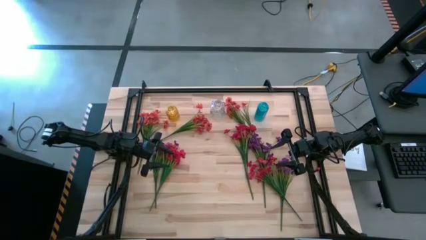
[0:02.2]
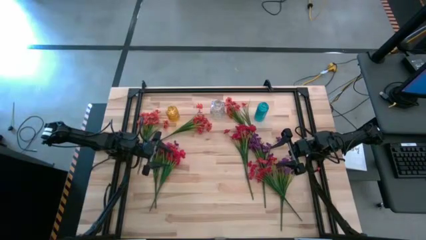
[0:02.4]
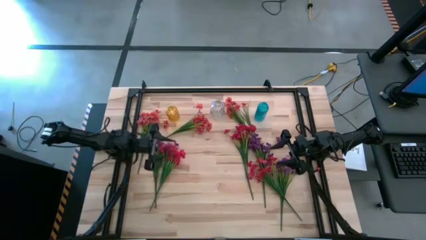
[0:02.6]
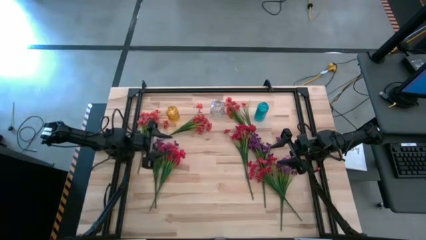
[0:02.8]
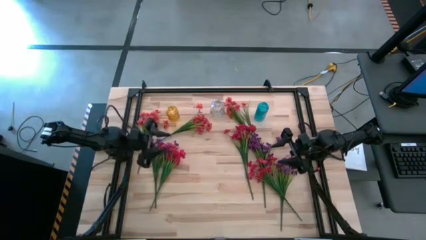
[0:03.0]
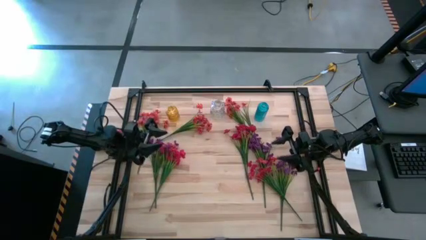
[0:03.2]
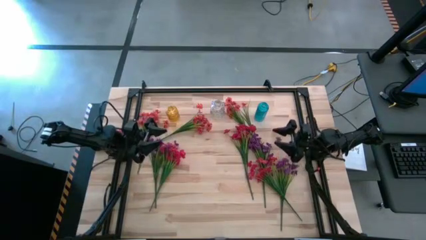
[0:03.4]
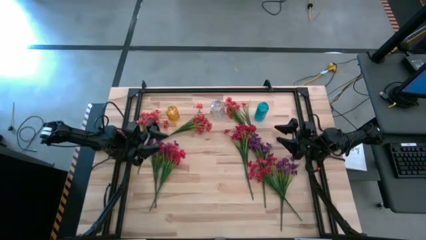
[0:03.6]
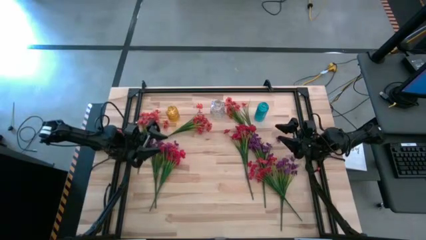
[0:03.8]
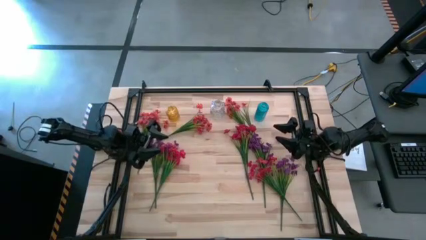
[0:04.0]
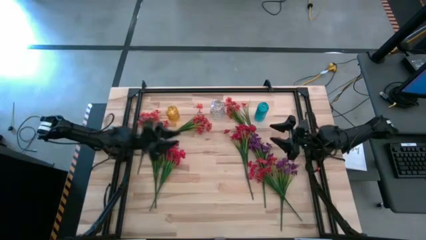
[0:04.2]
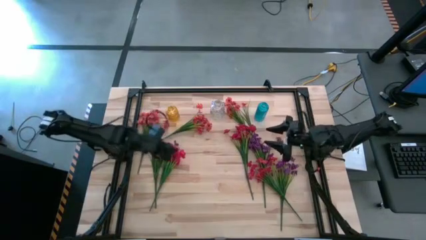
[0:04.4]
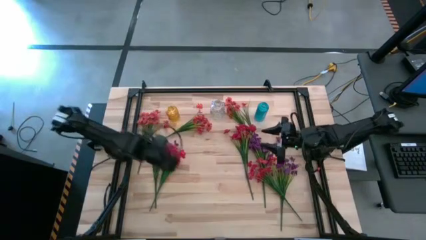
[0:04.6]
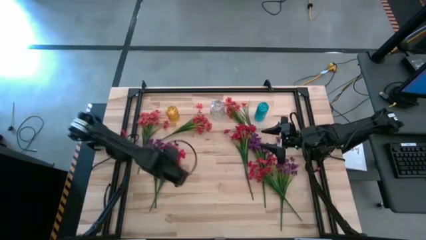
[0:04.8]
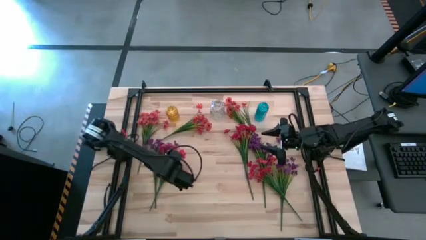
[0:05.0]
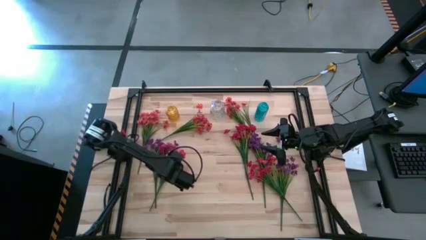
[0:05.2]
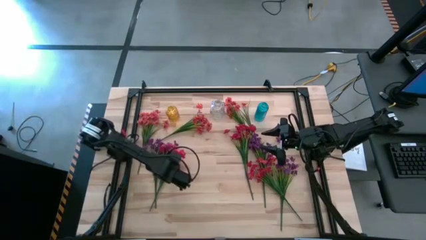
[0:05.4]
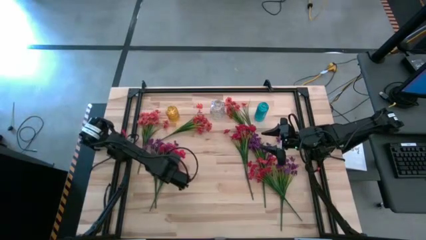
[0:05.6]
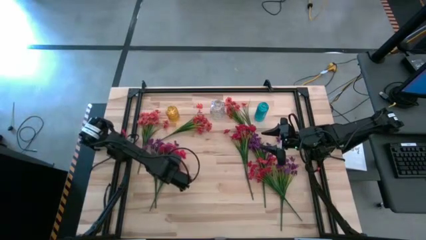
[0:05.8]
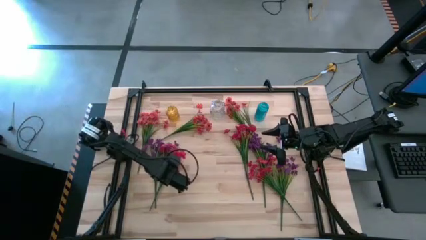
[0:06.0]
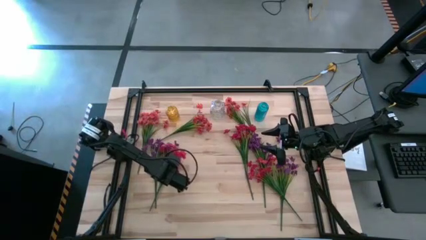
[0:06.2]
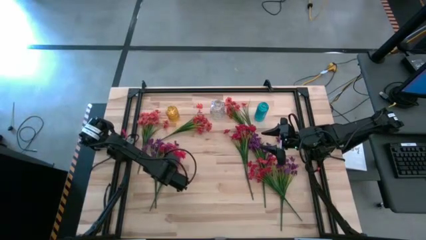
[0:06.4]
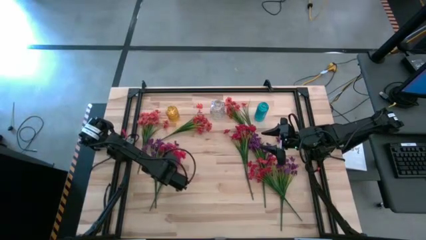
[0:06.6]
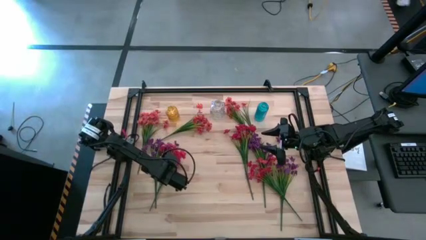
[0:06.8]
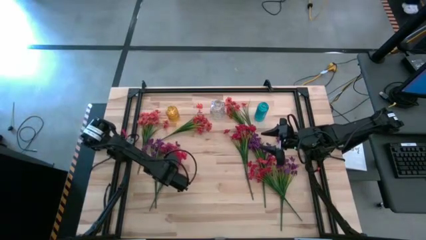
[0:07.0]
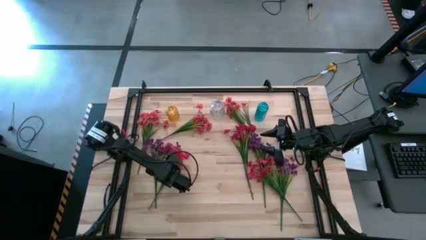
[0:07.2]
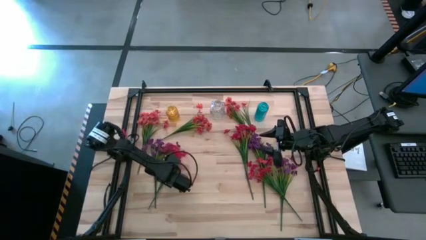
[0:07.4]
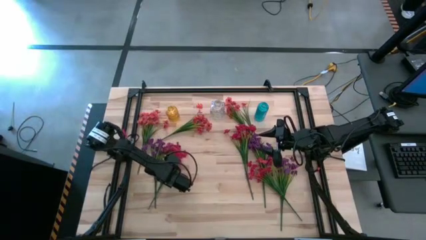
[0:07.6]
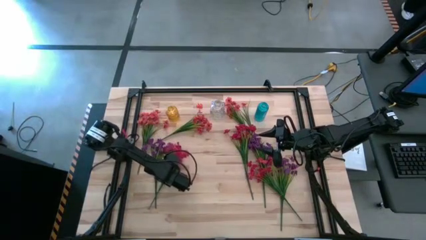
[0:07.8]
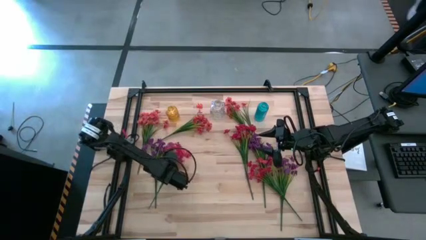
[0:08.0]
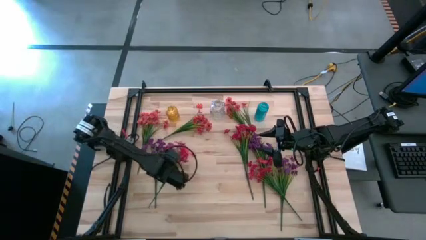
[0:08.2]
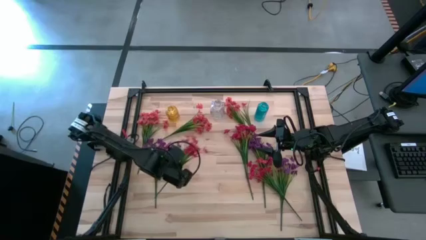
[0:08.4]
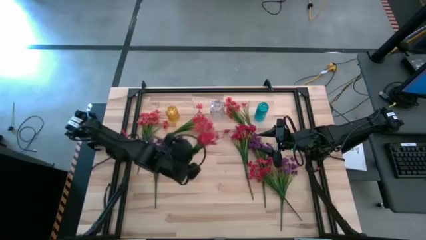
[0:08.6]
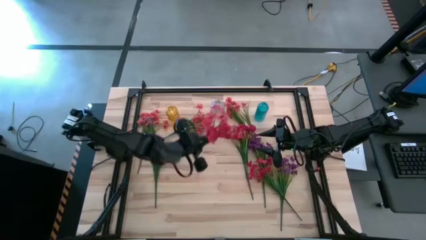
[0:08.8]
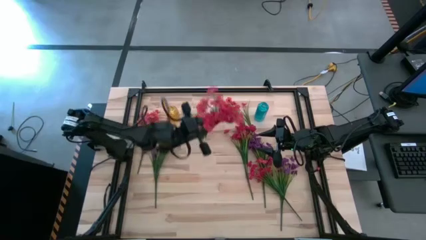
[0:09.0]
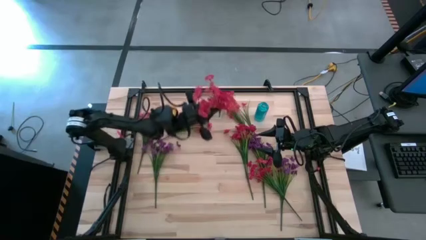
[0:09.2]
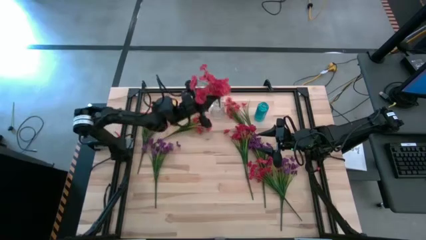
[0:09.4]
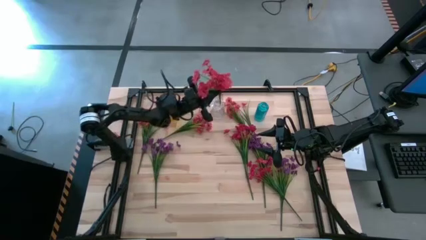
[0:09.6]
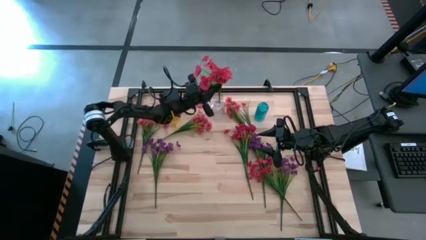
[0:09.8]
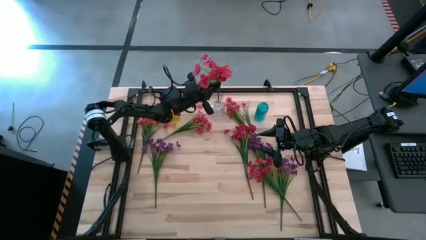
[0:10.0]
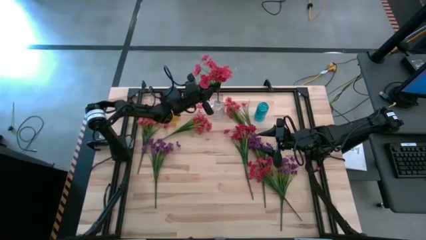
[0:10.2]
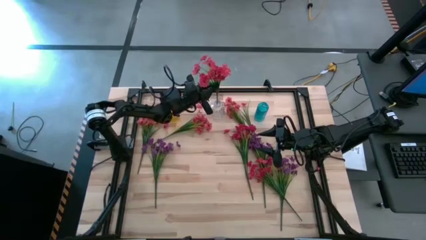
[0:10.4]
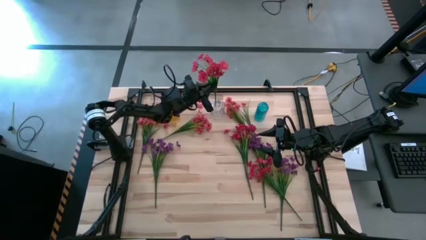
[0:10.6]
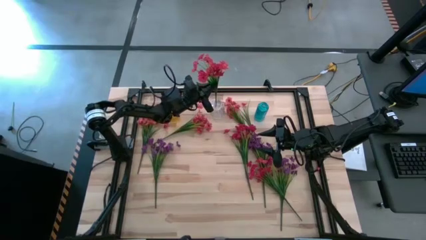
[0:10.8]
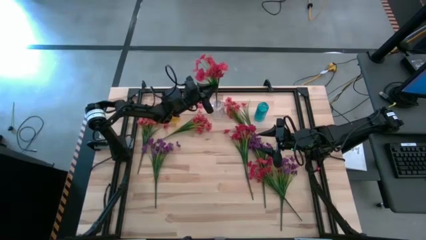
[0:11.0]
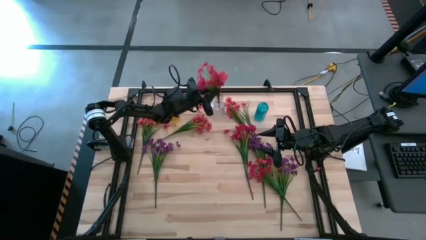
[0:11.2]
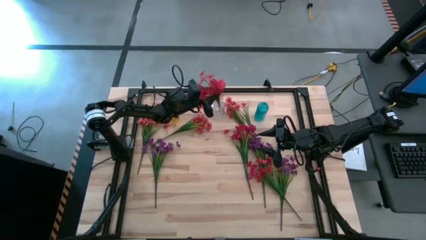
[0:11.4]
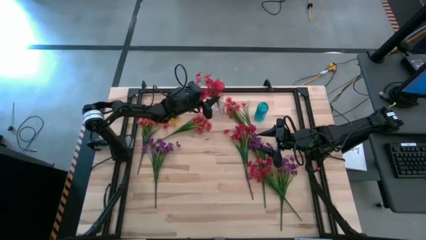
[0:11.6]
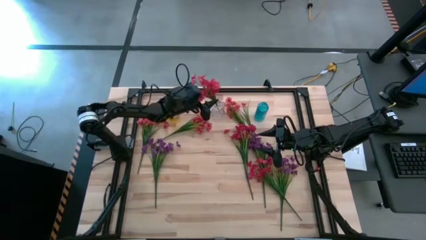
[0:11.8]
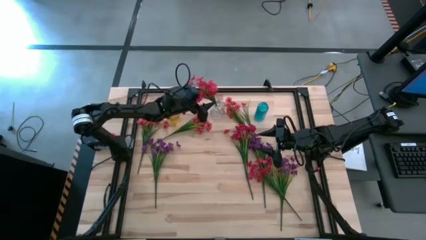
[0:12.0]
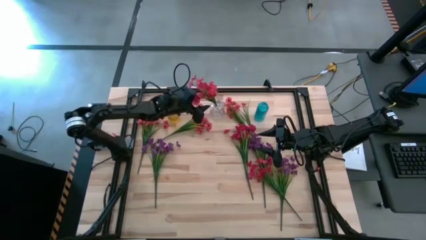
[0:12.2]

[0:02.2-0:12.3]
Task: Sort flowers into vase by color
Put the red flowers into the transparent vase
